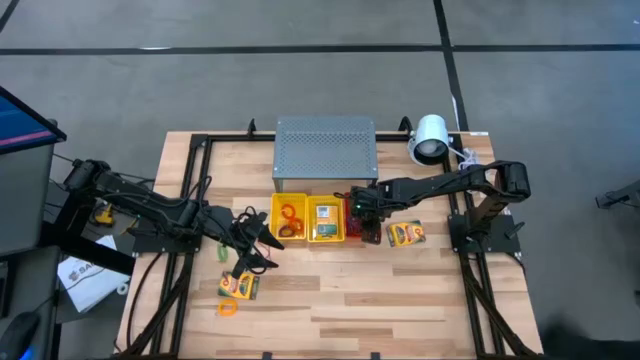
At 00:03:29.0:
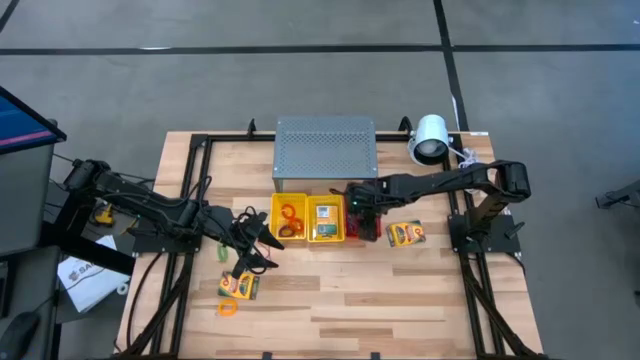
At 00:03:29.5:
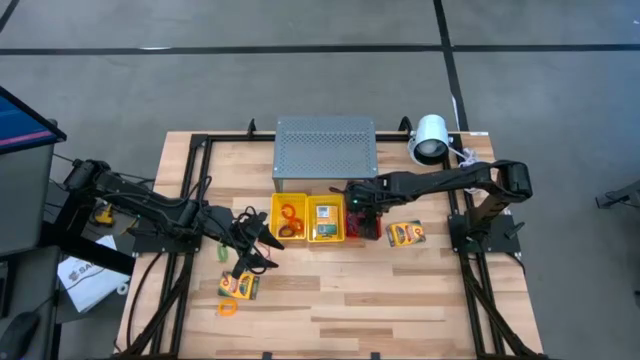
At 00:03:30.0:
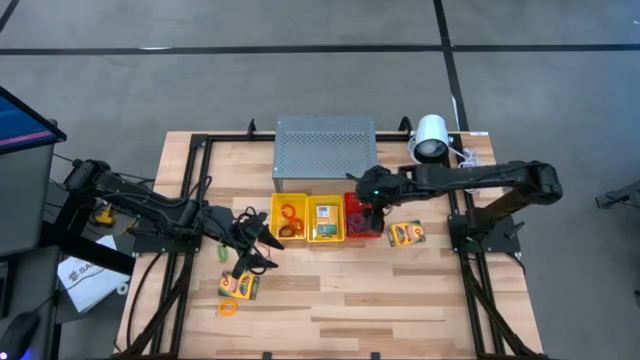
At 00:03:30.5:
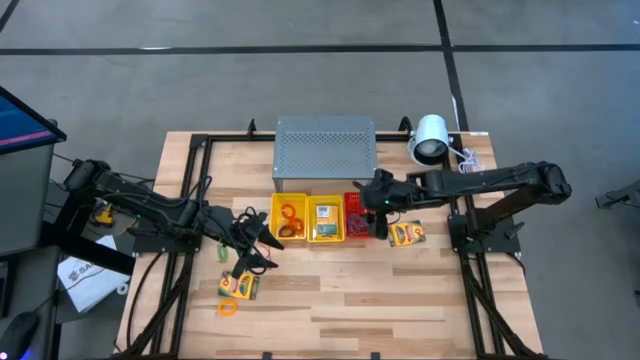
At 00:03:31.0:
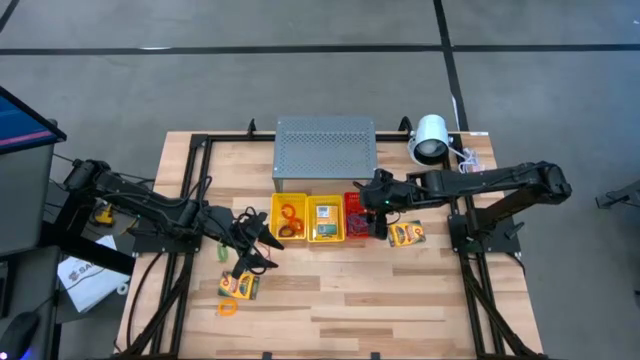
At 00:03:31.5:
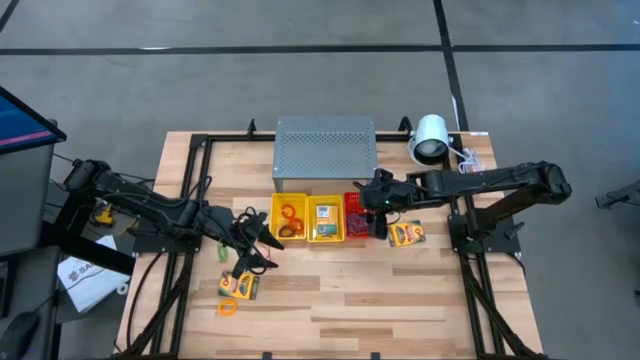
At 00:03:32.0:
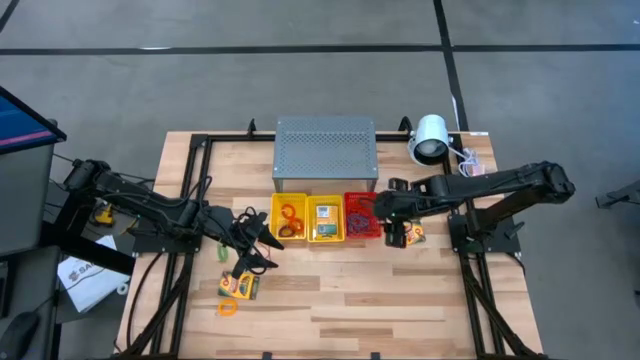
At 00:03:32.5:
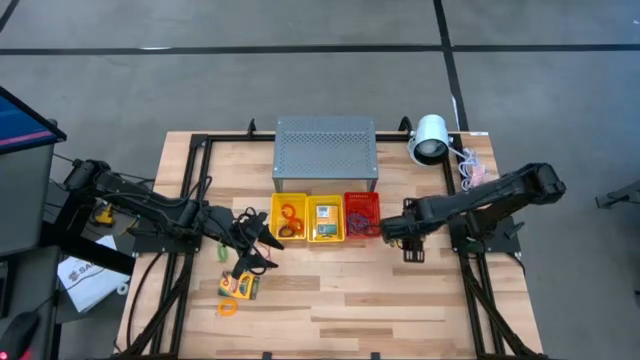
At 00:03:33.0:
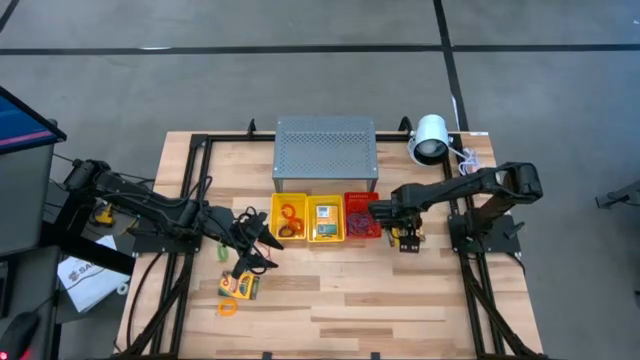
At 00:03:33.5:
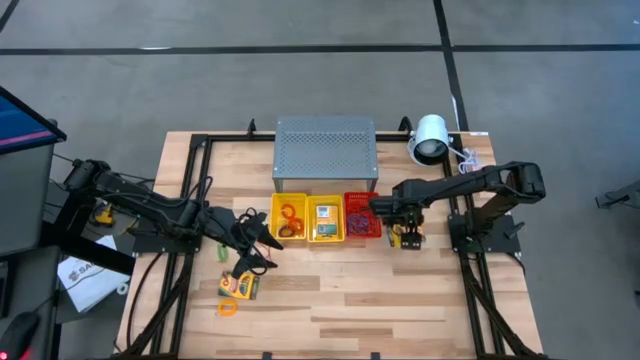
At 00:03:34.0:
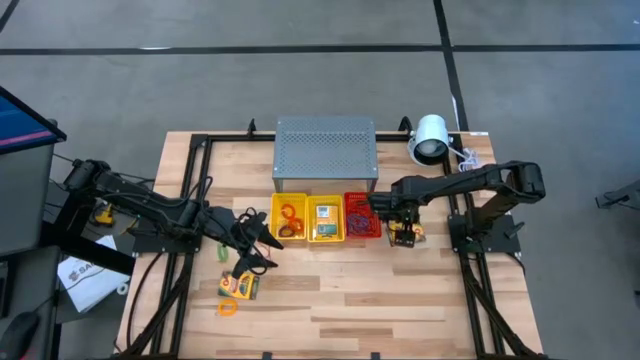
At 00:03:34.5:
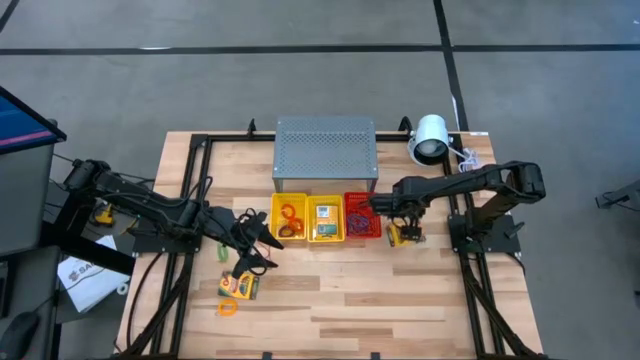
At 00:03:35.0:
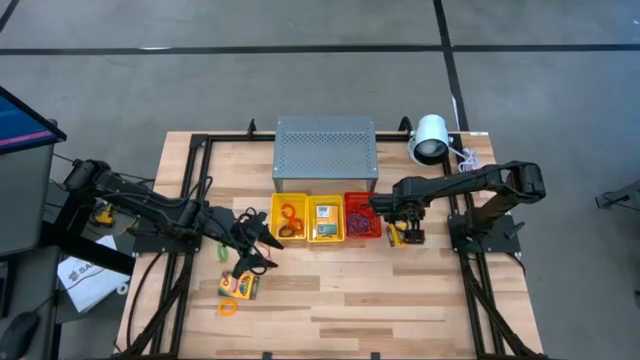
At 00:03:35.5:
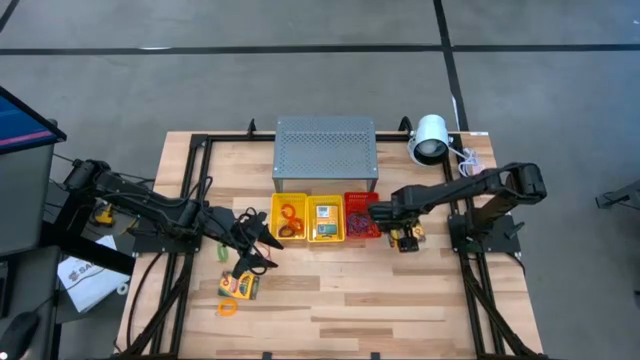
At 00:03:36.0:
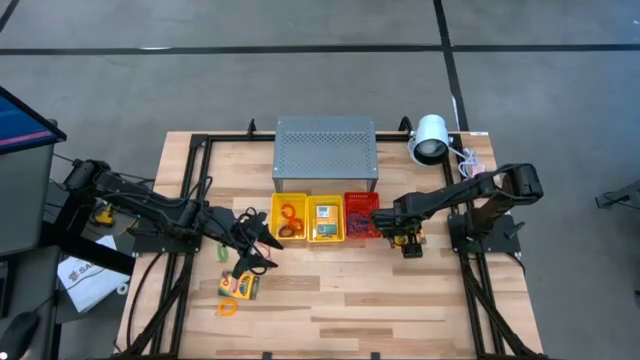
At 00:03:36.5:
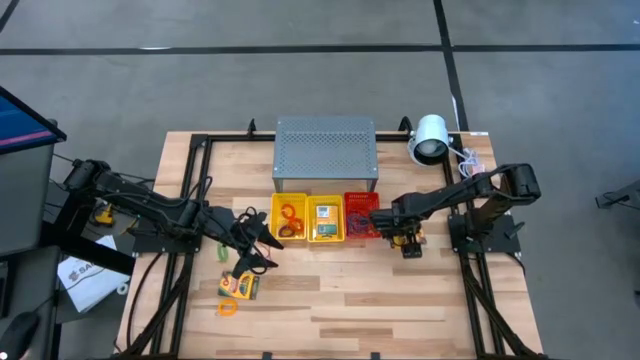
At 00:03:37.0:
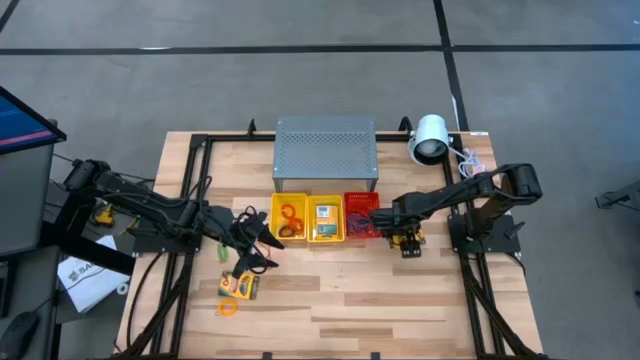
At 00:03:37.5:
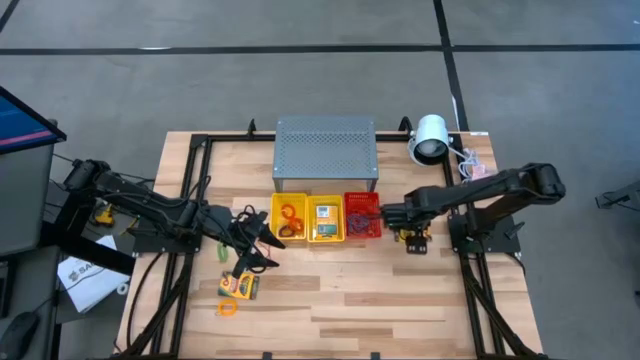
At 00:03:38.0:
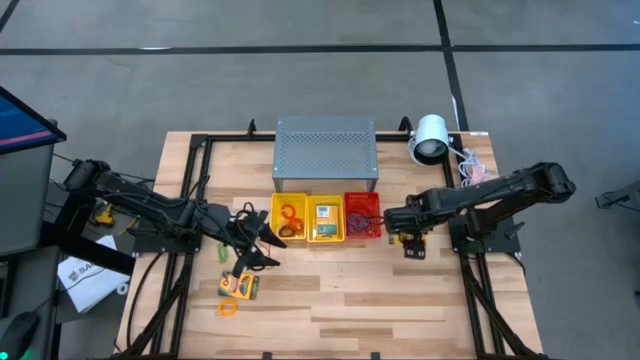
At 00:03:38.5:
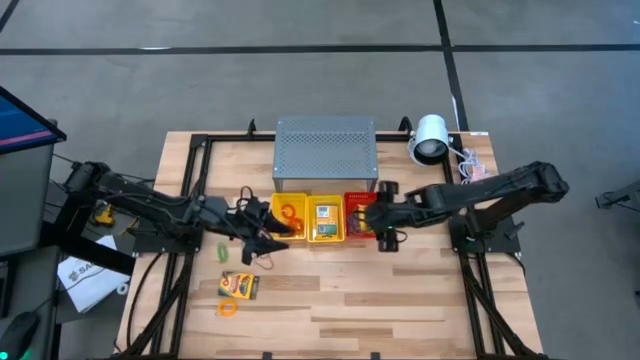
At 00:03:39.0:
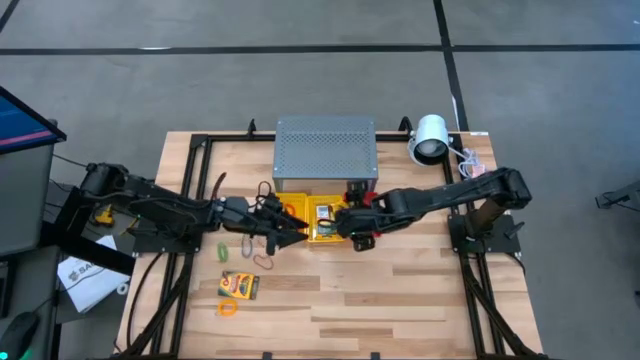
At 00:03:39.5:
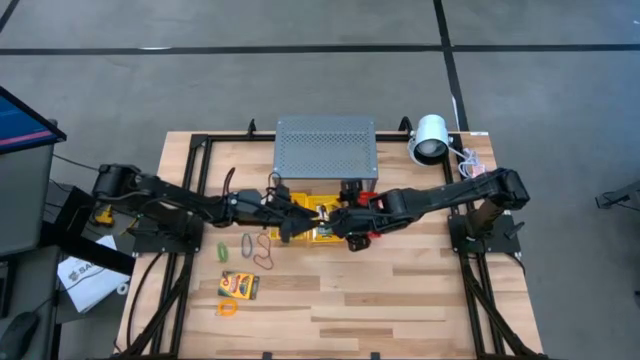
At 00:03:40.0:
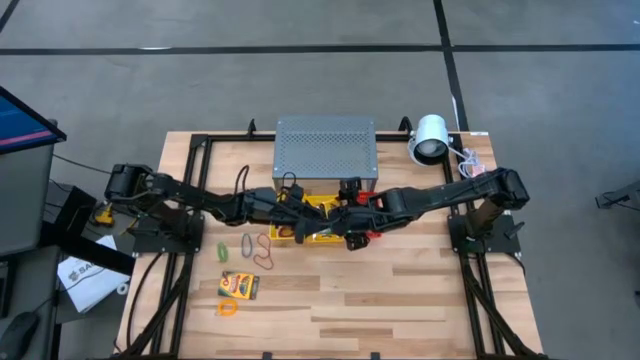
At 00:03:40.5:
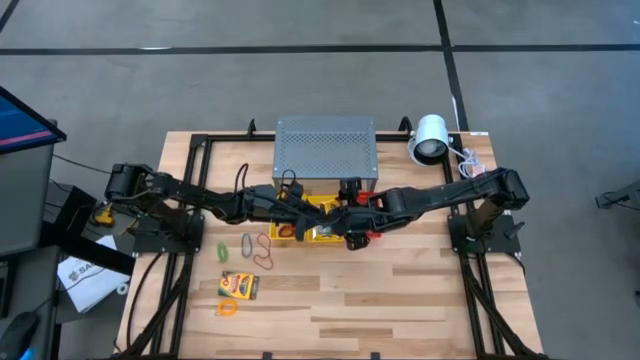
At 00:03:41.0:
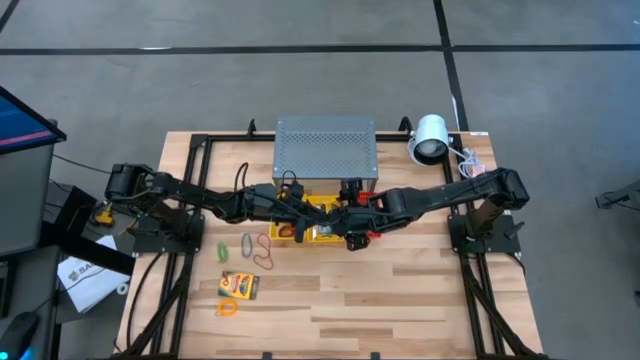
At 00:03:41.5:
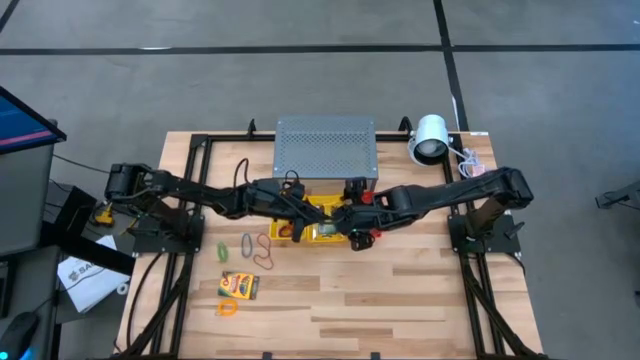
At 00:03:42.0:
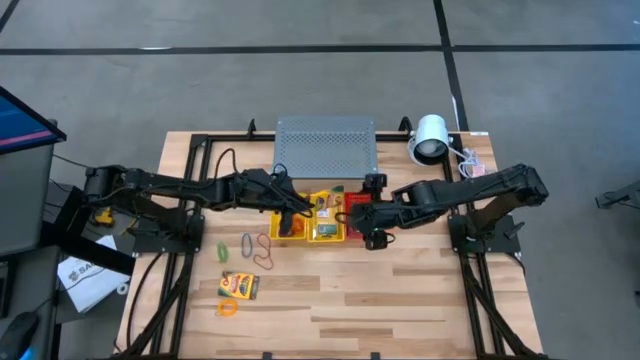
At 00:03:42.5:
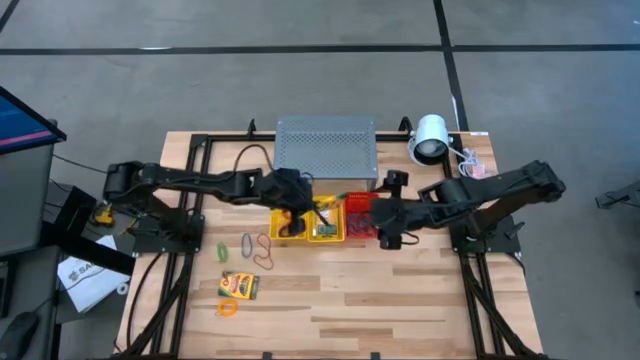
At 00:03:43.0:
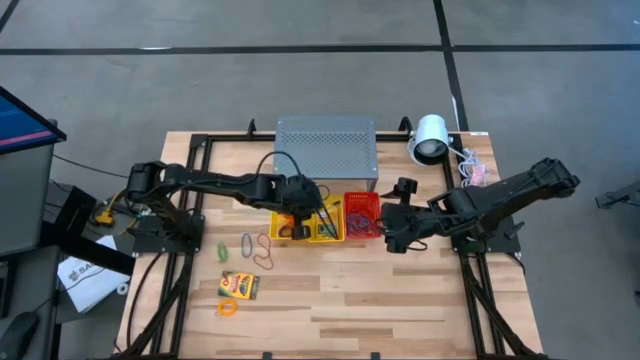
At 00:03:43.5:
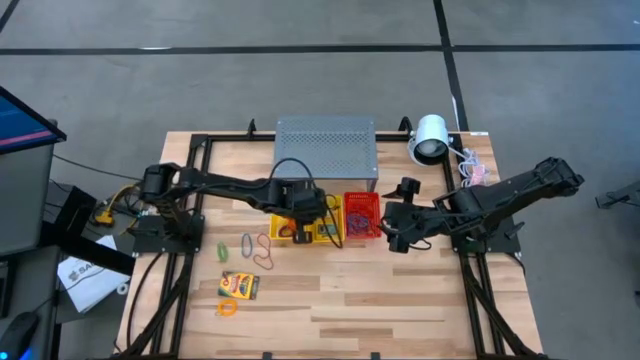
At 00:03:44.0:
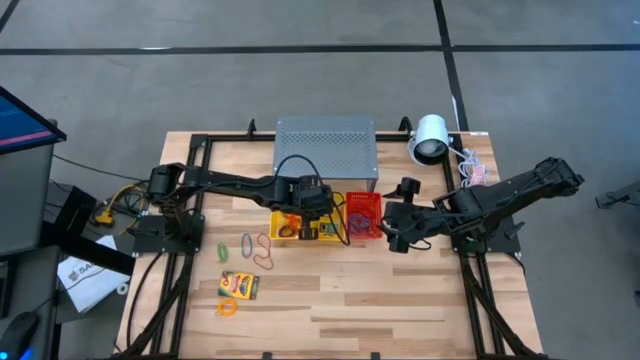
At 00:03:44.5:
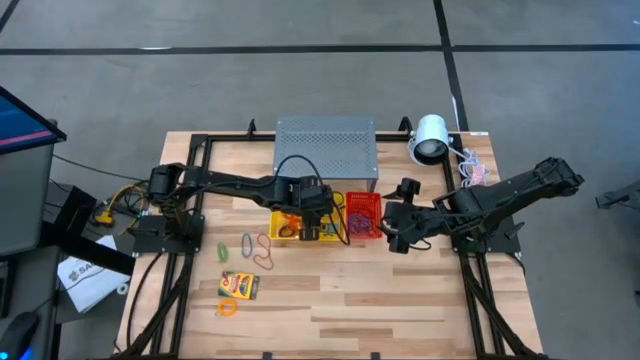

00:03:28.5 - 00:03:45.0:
Task: Pick & Place Office Desk Supplies
Put the yellow crayon box into the right yellow bin

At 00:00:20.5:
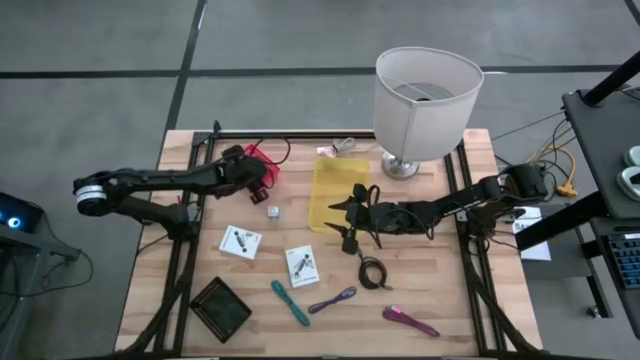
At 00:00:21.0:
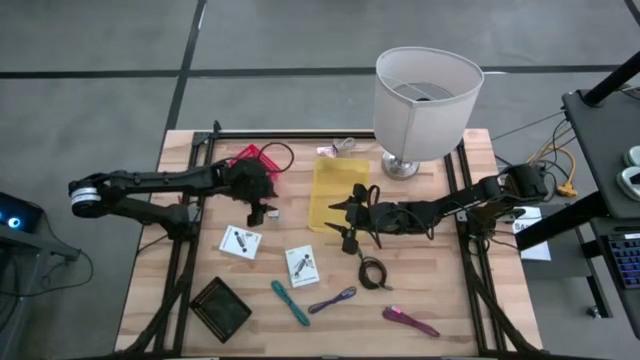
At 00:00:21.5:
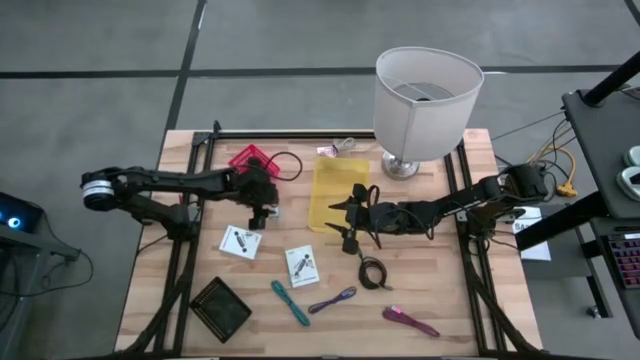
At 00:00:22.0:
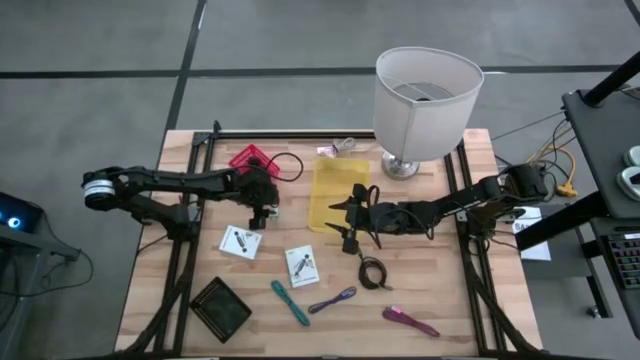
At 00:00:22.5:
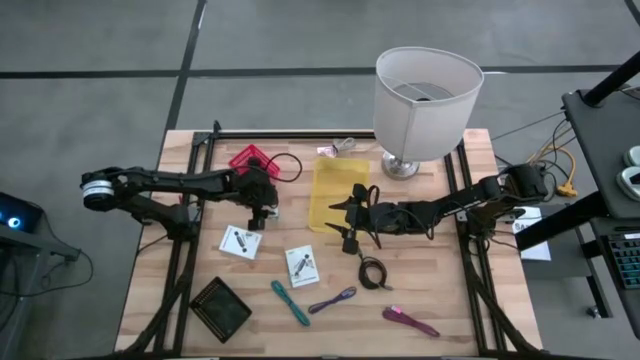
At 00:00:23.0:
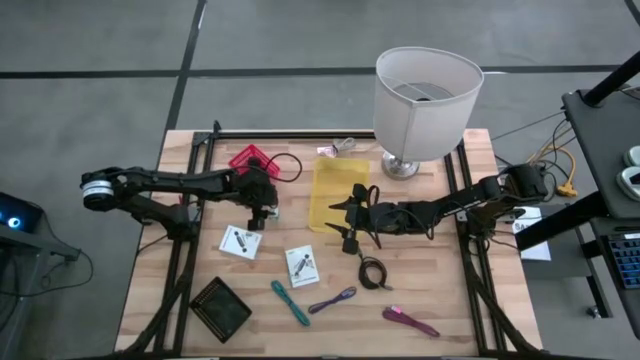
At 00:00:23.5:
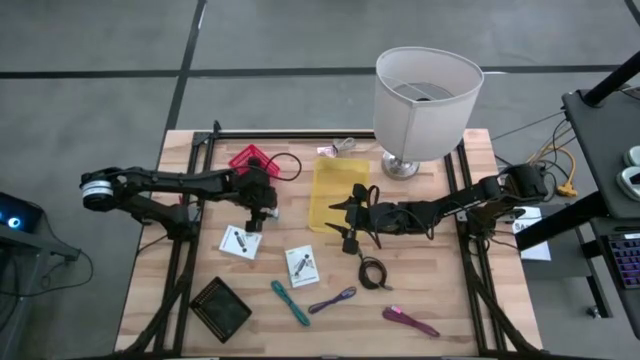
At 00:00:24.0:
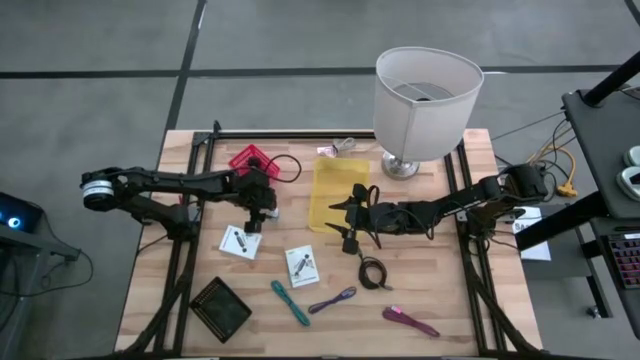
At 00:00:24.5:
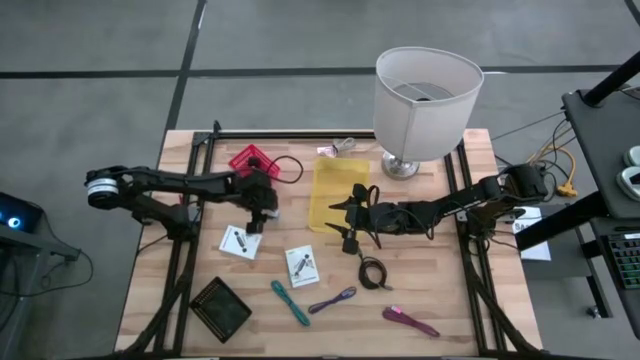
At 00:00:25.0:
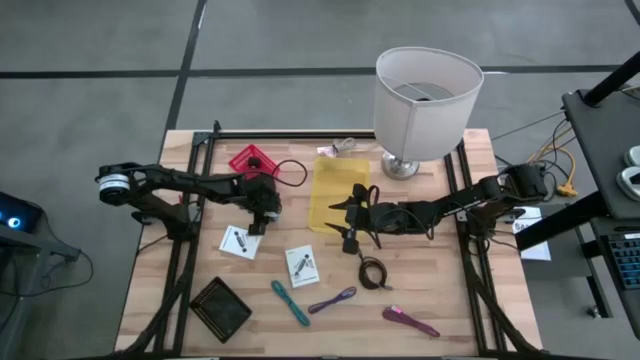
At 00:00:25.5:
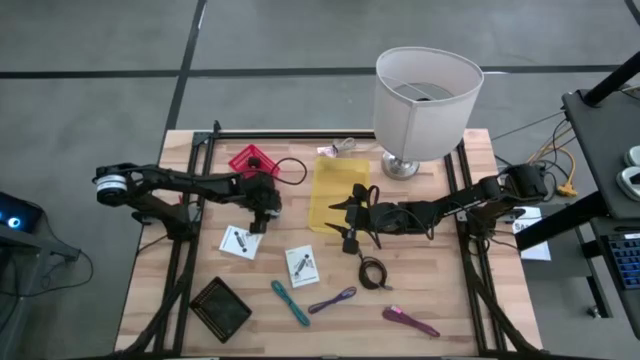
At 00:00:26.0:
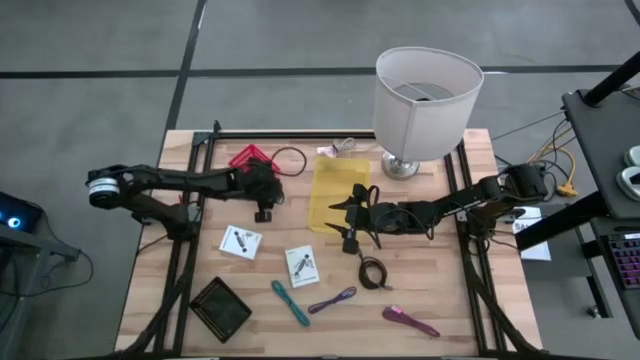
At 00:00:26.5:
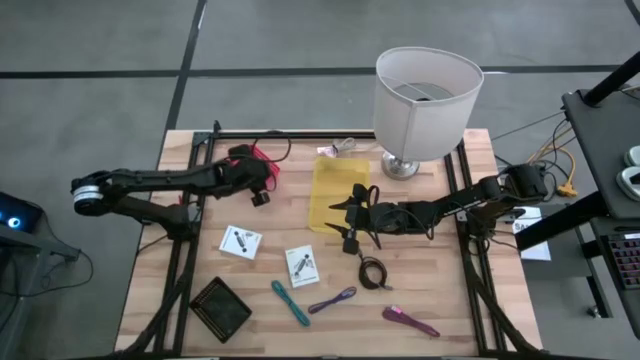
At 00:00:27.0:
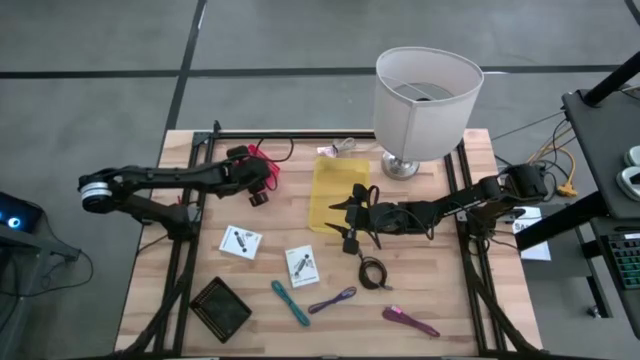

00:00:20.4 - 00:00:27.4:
Task: Pick and place items into bin
Put the blue charger adapter into the red bin
